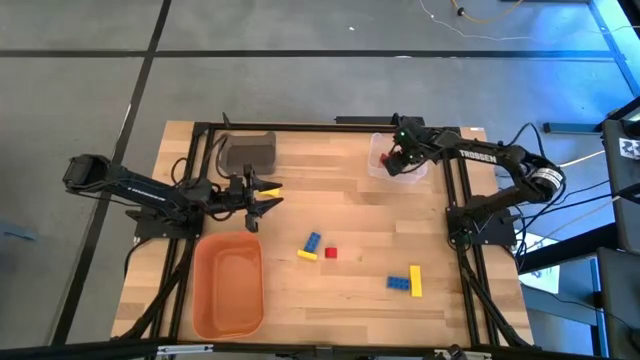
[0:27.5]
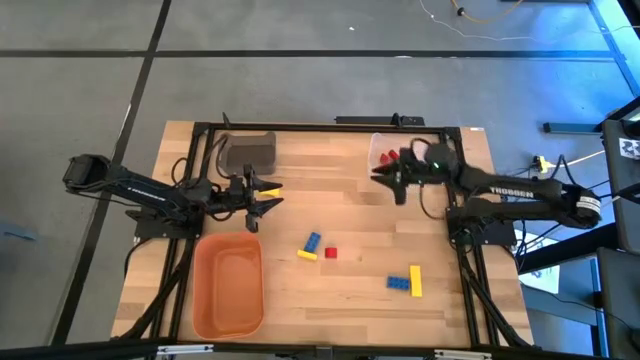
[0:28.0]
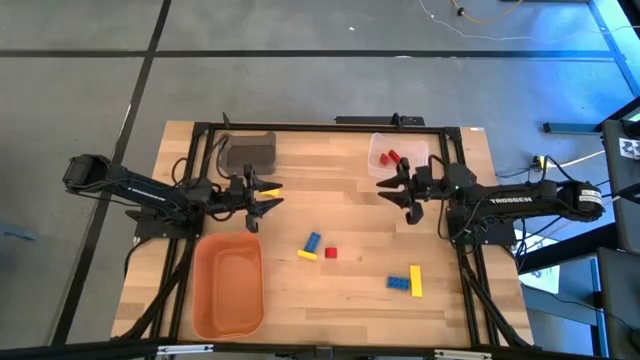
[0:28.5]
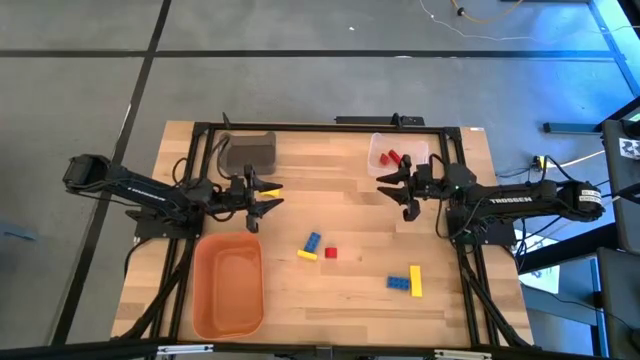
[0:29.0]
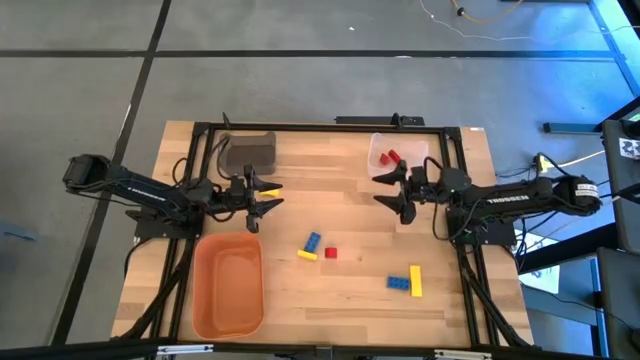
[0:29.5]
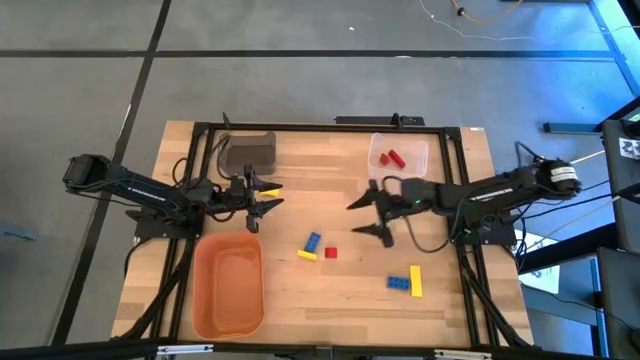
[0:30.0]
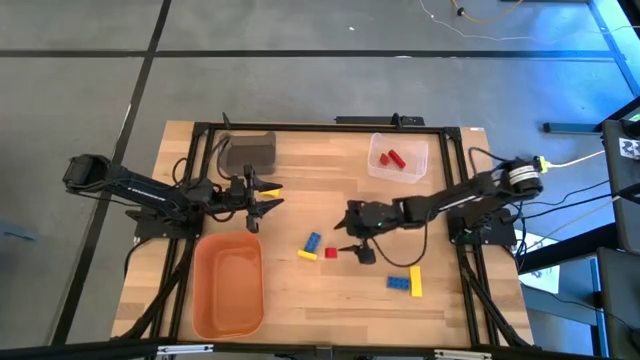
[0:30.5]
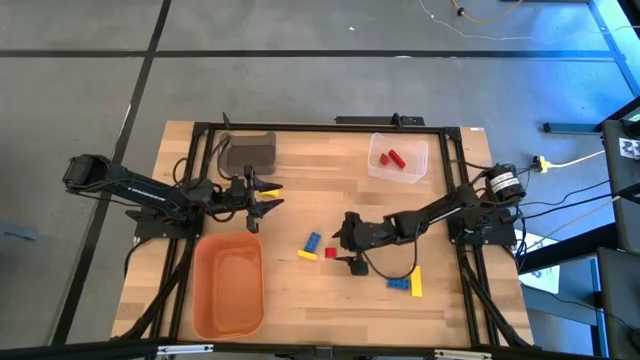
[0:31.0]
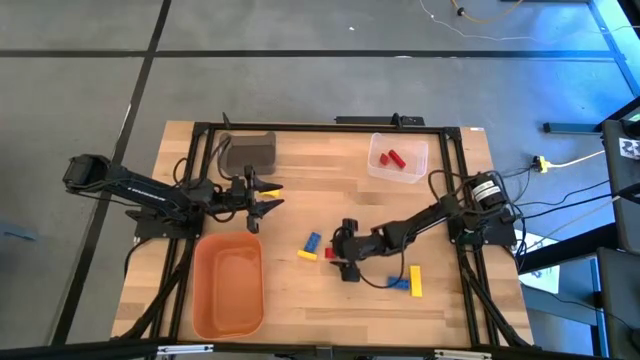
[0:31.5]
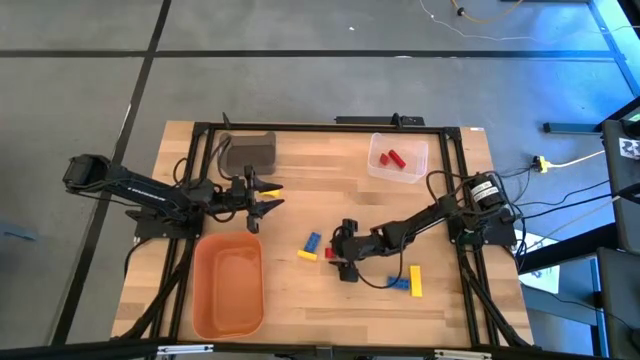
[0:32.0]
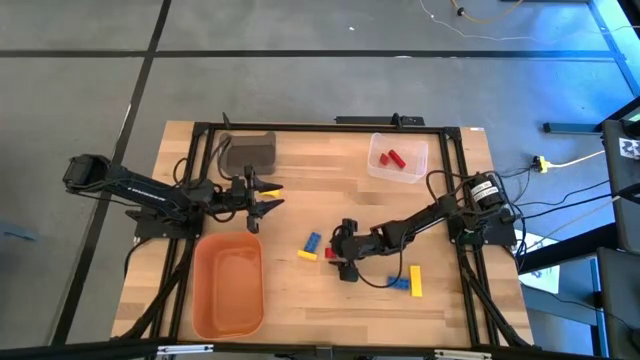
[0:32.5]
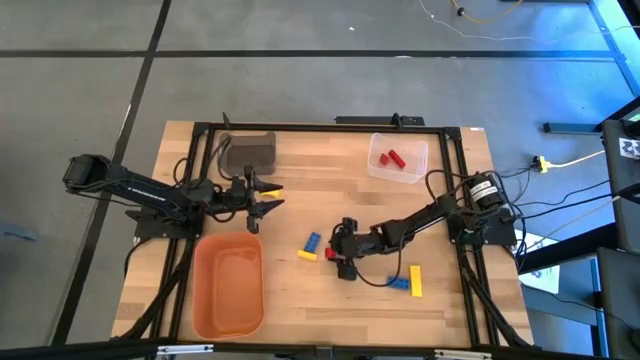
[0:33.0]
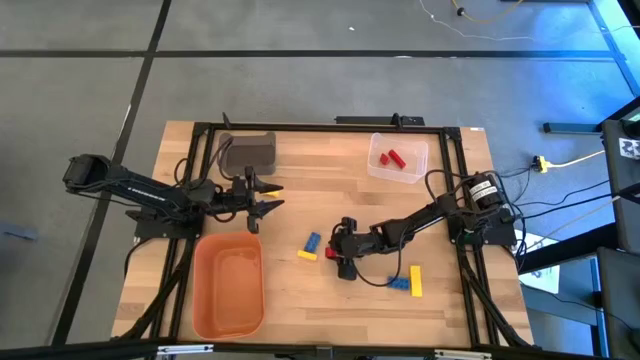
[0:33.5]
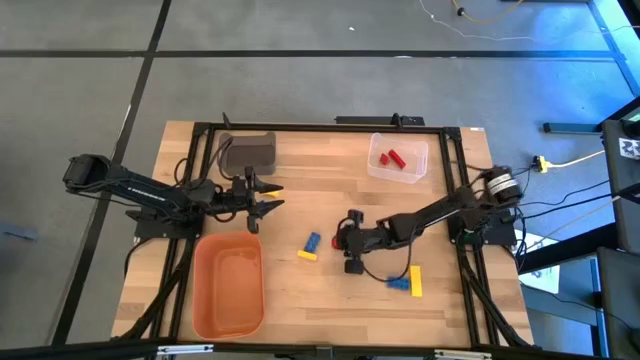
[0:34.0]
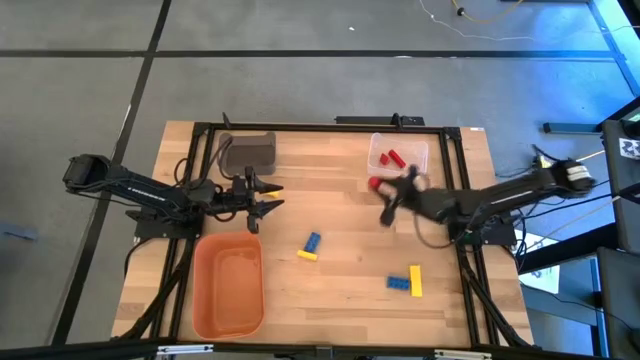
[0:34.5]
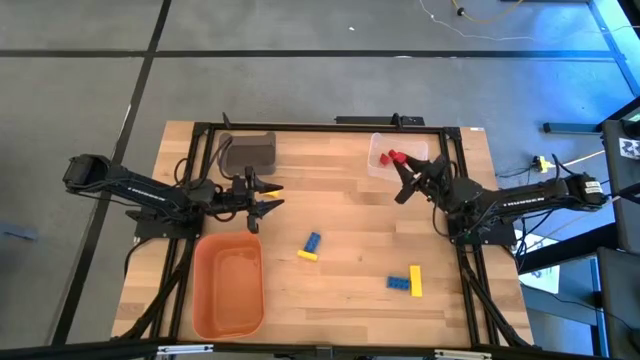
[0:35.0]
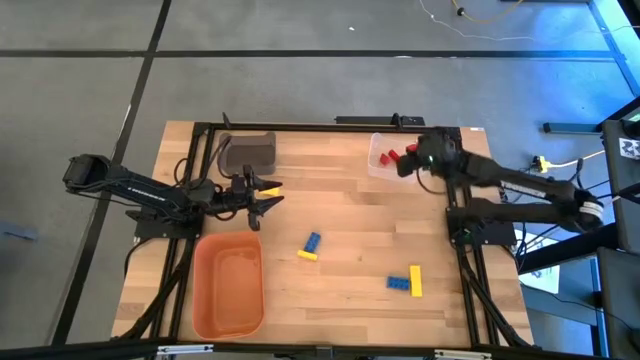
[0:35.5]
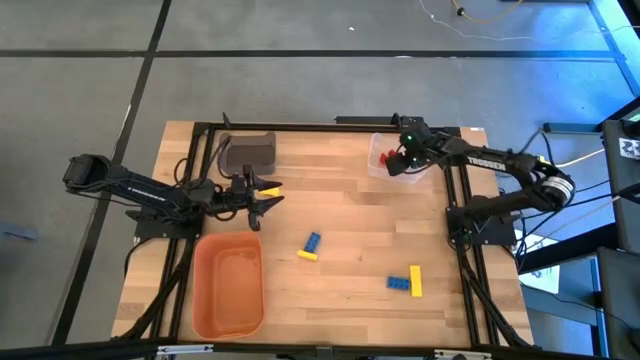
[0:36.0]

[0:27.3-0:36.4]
Task: Sort & place blocks by color
Put the red block into the transparent white bin

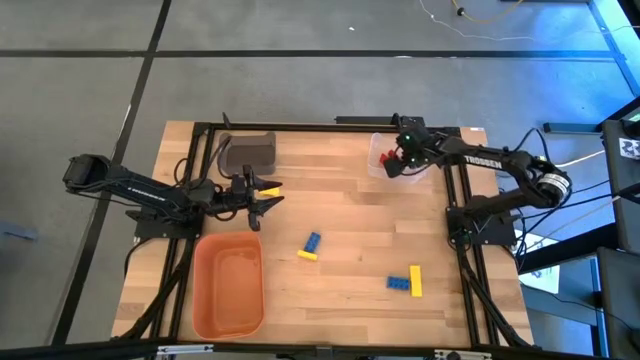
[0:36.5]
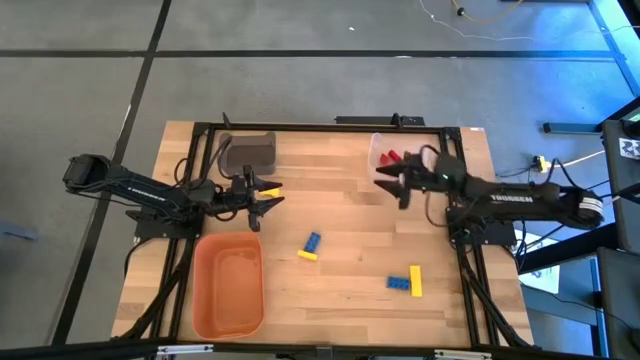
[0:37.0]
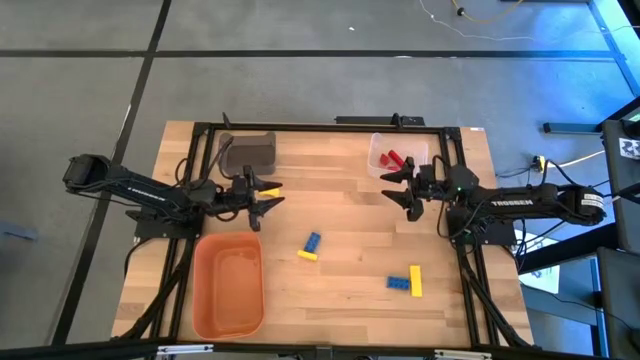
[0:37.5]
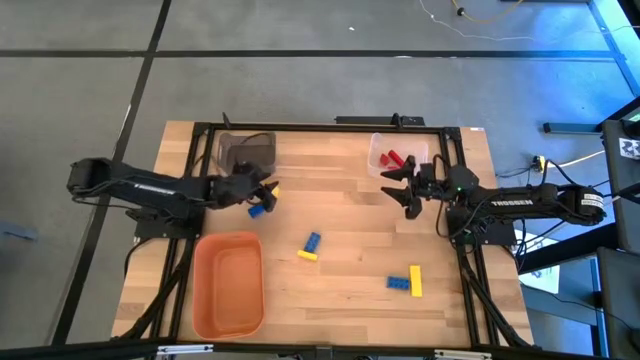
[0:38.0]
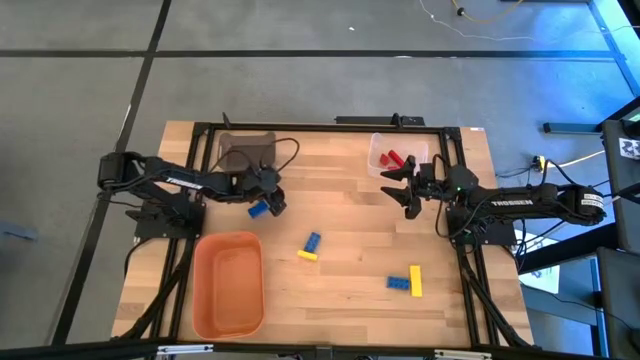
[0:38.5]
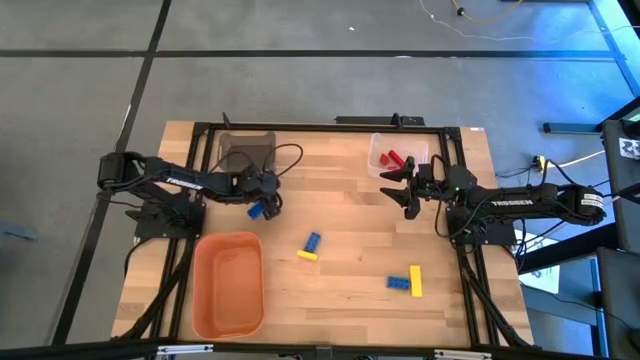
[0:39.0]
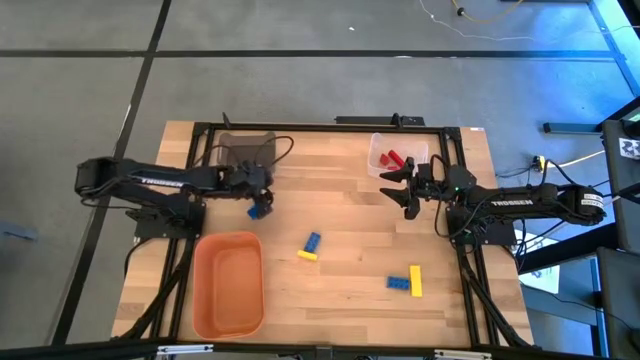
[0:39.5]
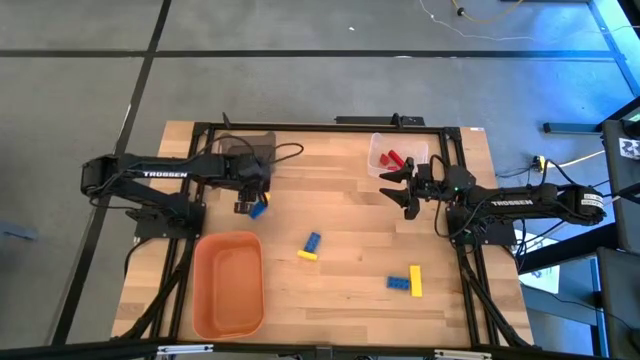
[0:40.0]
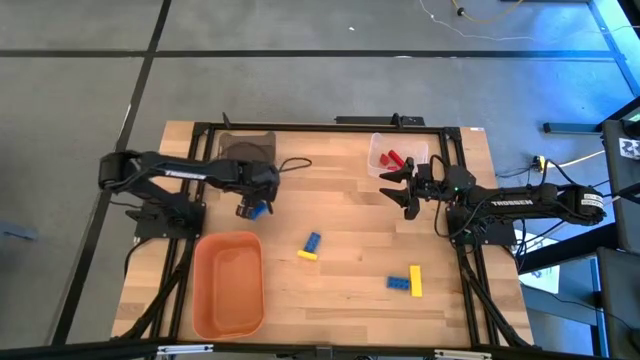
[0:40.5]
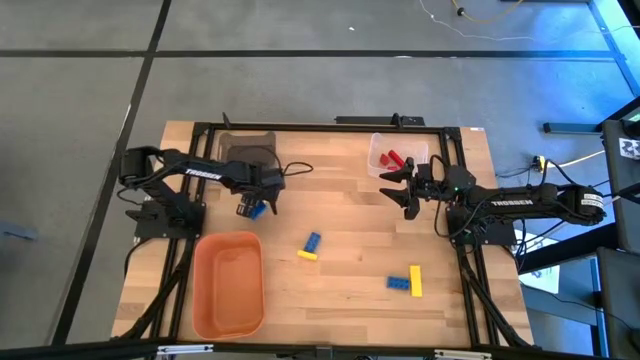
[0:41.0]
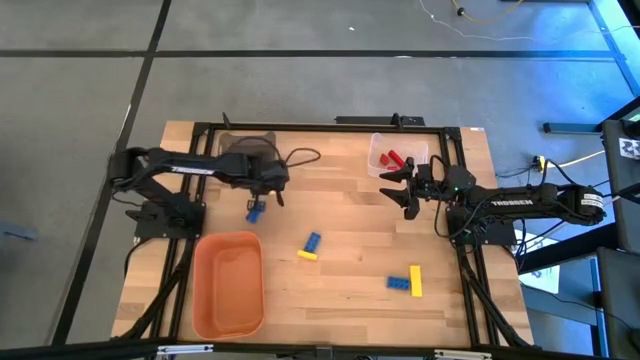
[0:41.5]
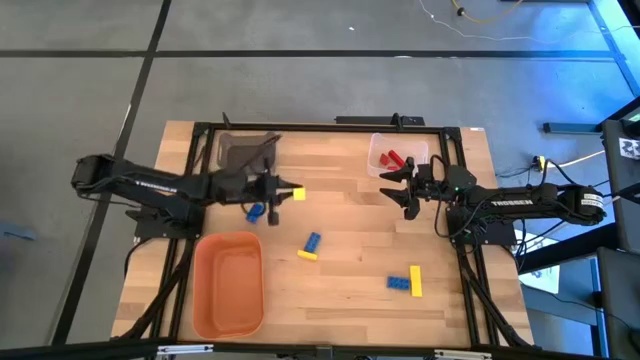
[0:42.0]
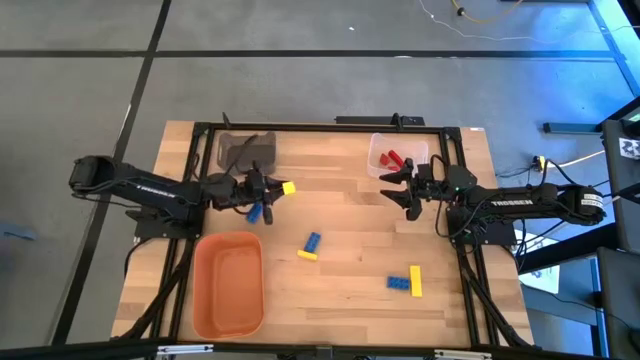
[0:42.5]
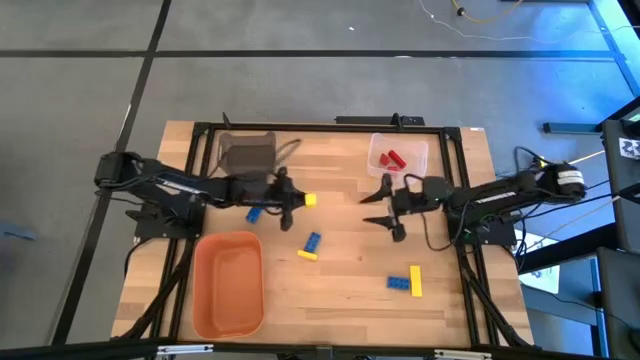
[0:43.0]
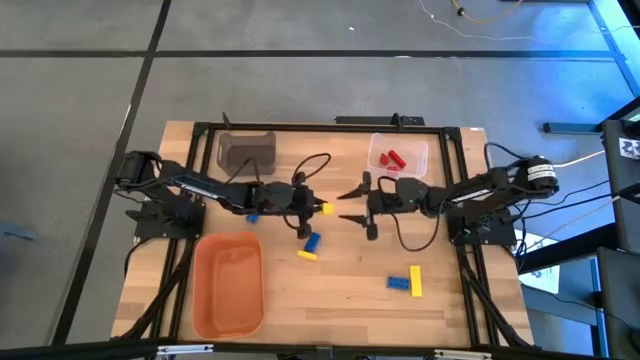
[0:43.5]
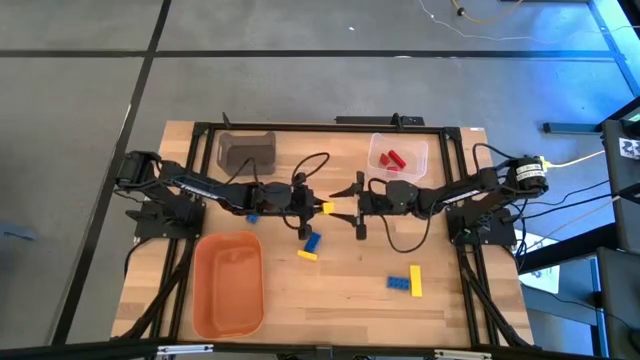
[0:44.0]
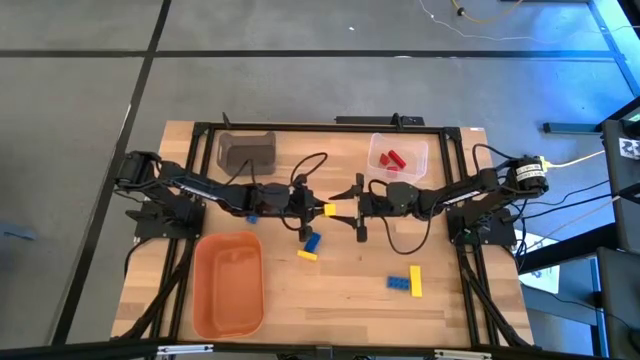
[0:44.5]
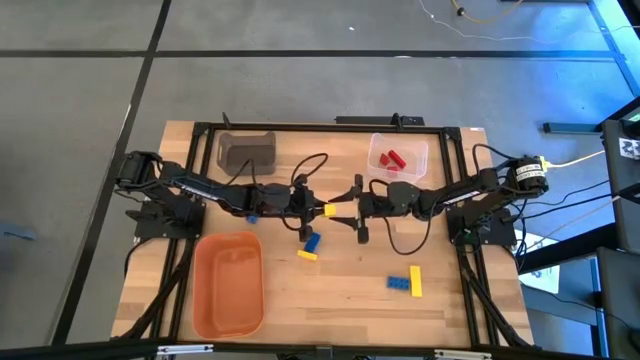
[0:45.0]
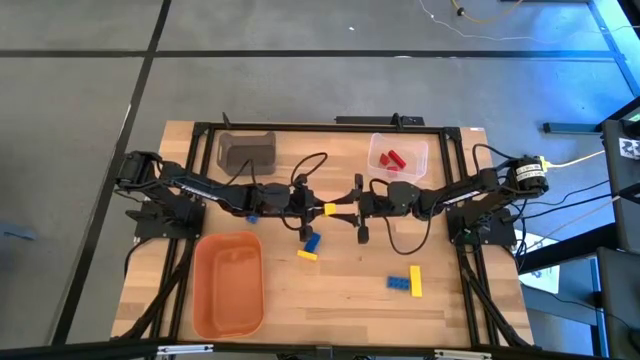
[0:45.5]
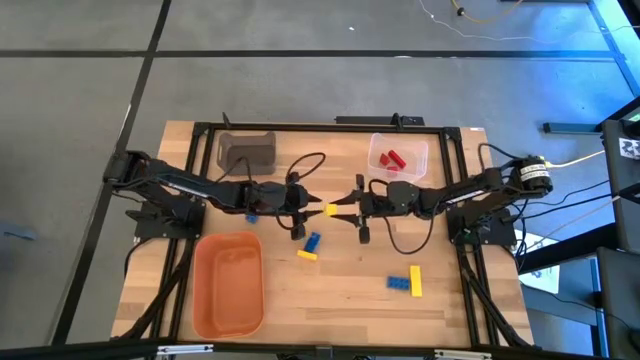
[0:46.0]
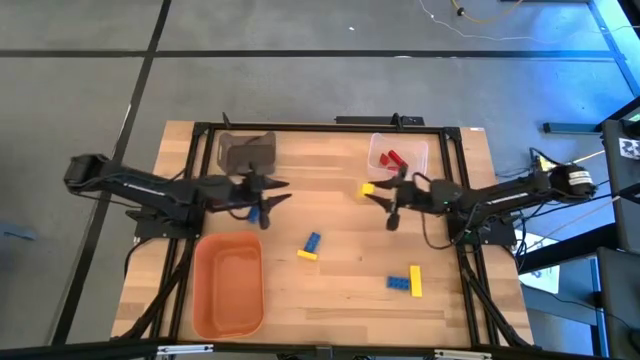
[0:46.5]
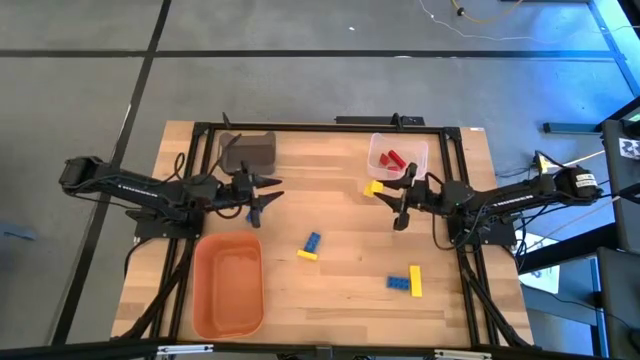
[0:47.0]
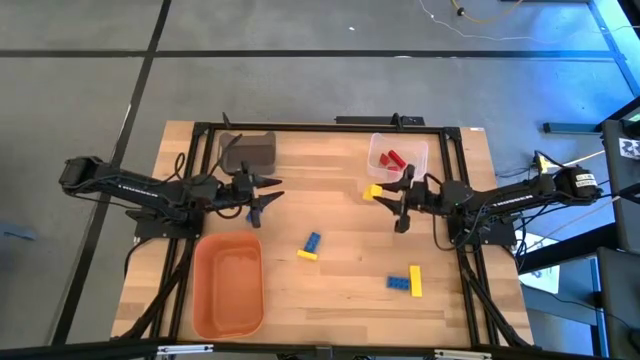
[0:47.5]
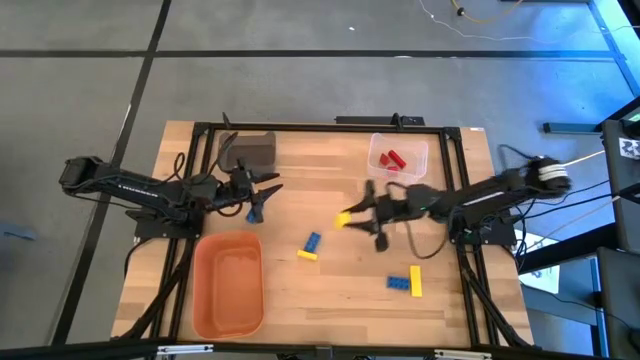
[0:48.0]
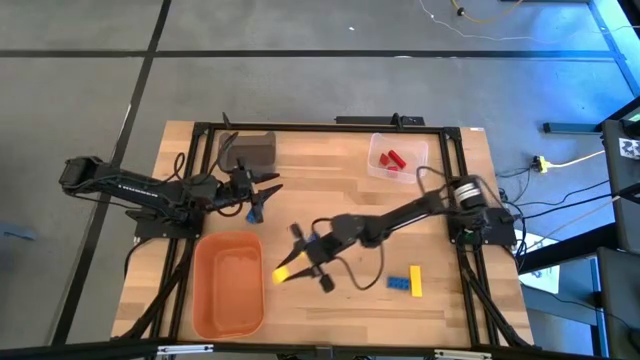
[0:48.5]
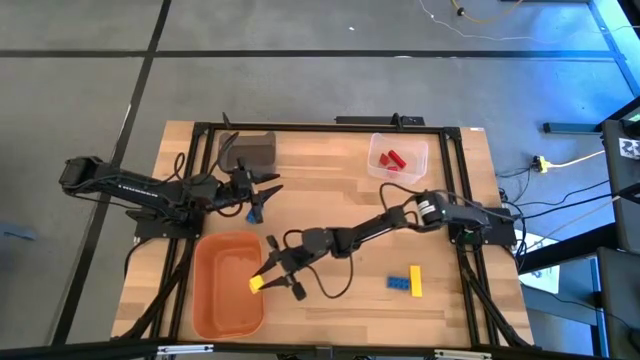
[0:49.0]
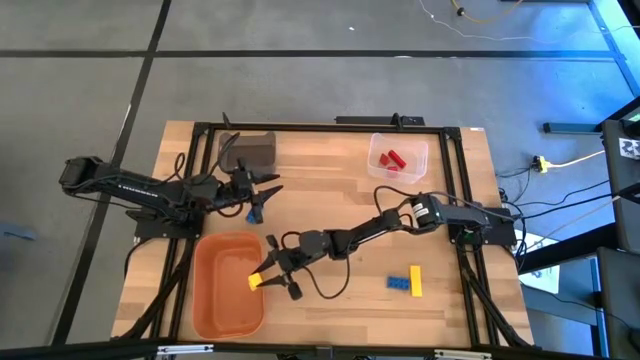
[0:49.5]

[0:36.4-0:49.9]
Put the top yellow block into the orange bin
